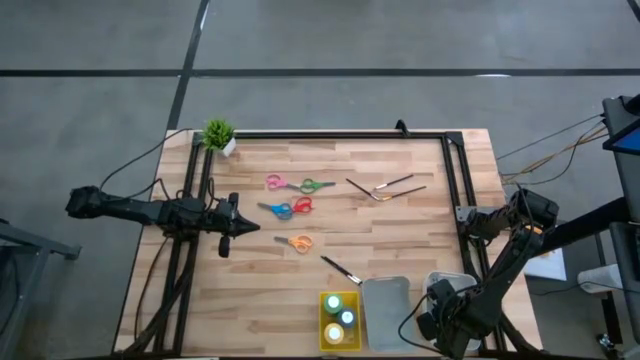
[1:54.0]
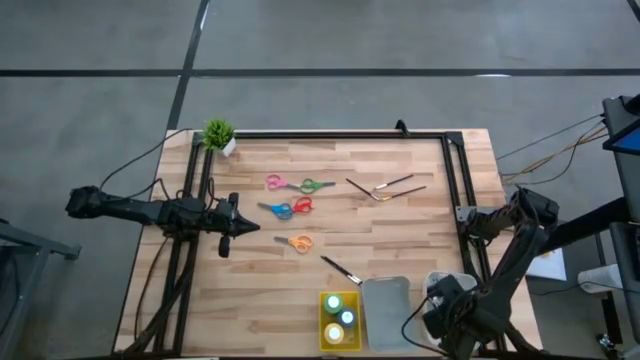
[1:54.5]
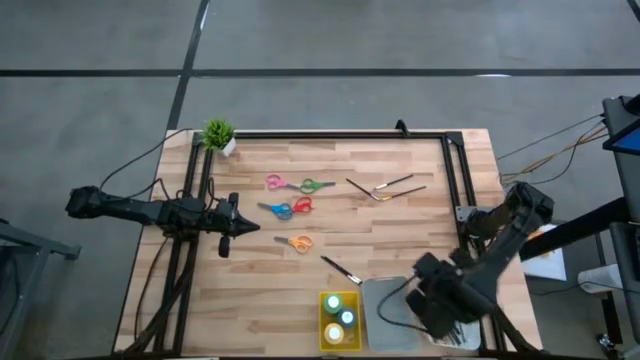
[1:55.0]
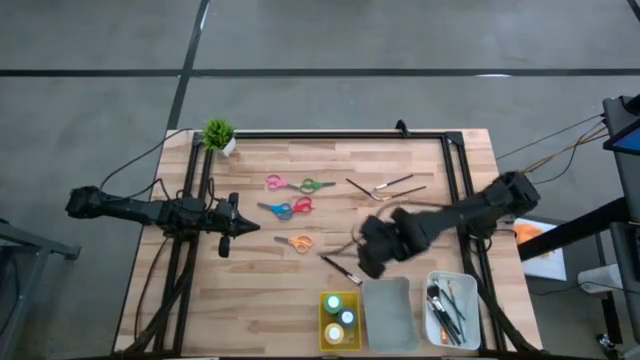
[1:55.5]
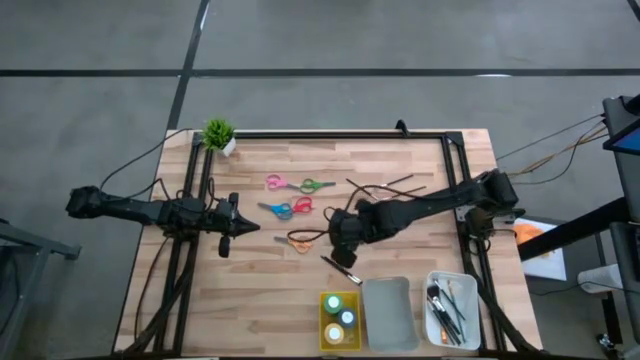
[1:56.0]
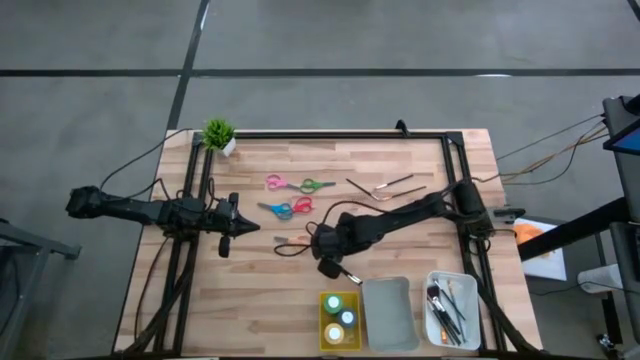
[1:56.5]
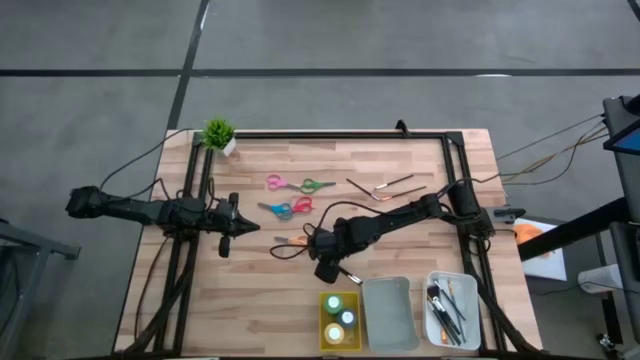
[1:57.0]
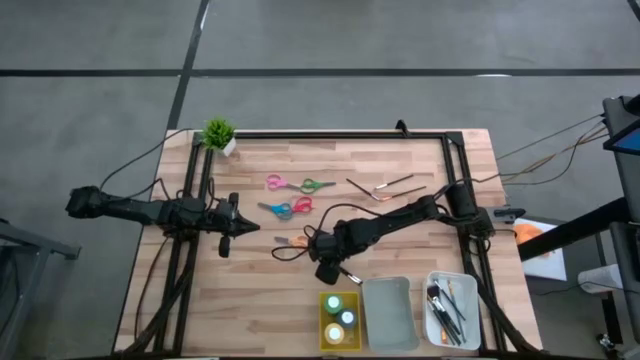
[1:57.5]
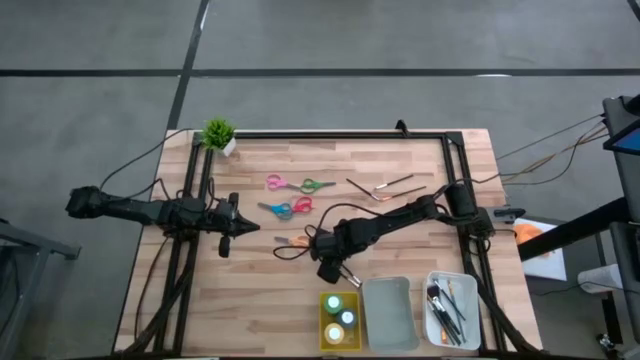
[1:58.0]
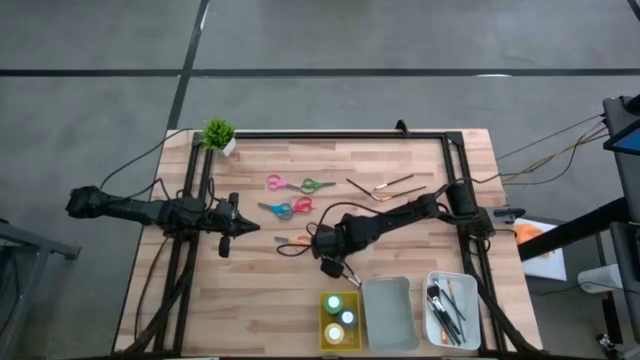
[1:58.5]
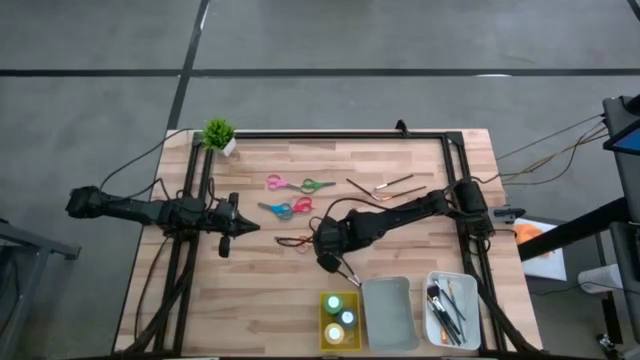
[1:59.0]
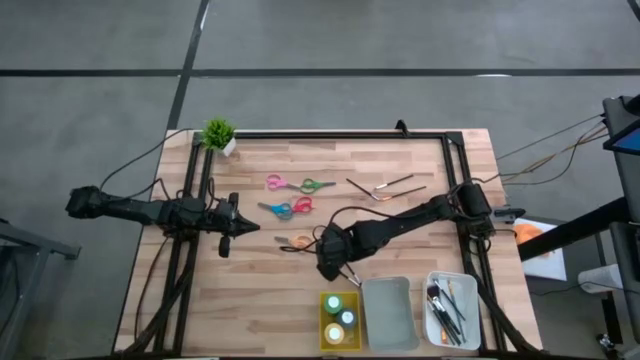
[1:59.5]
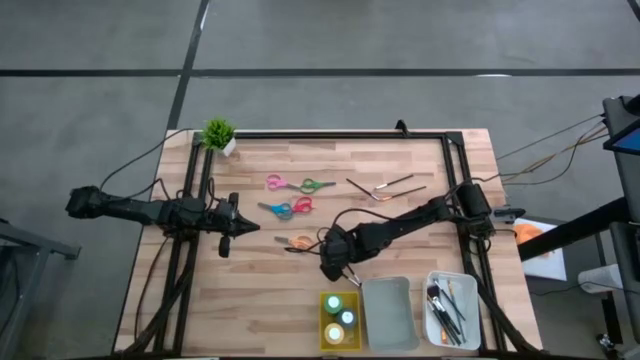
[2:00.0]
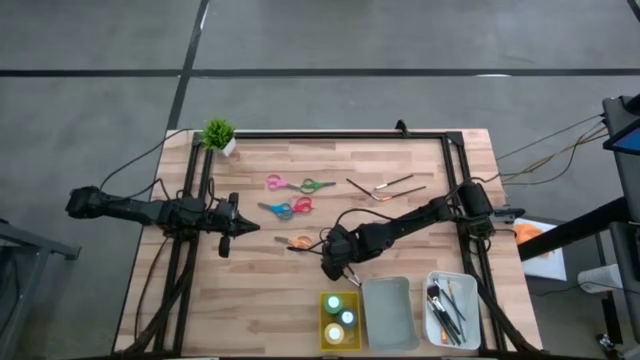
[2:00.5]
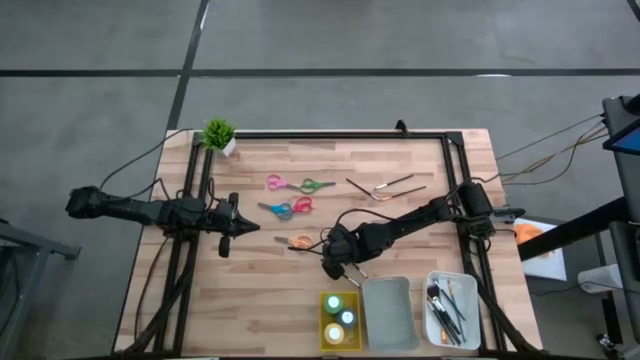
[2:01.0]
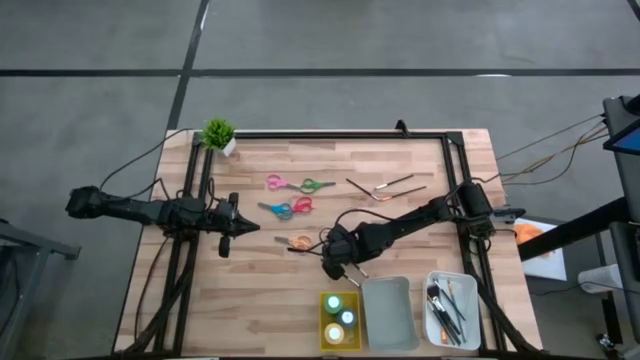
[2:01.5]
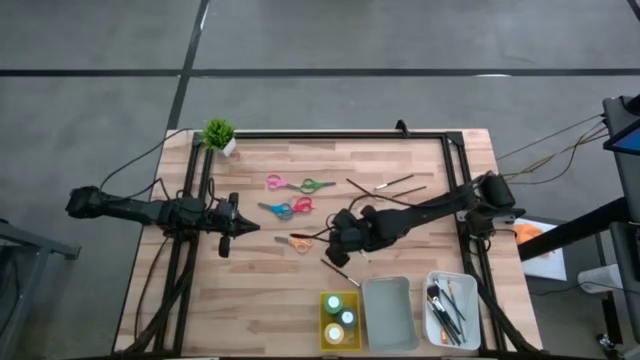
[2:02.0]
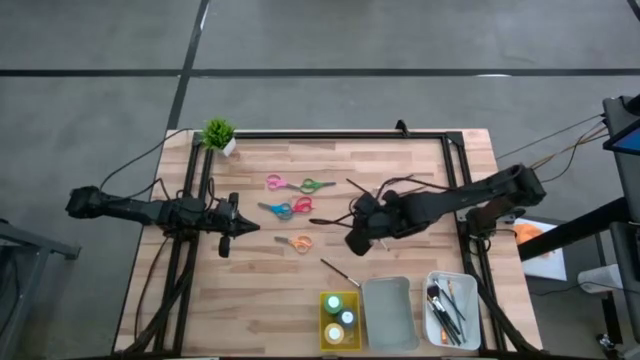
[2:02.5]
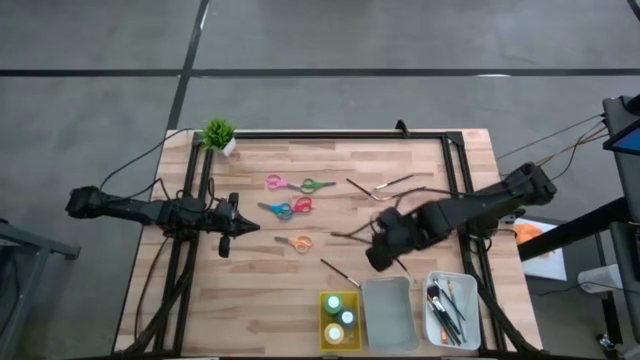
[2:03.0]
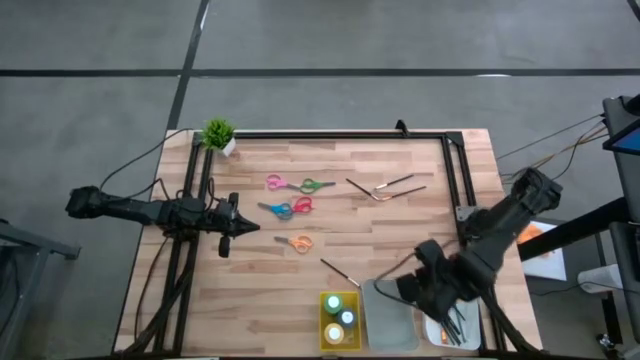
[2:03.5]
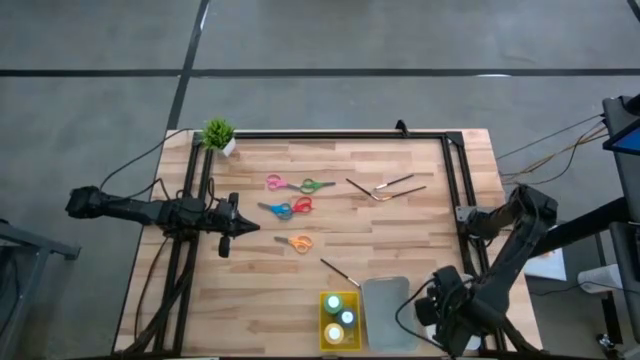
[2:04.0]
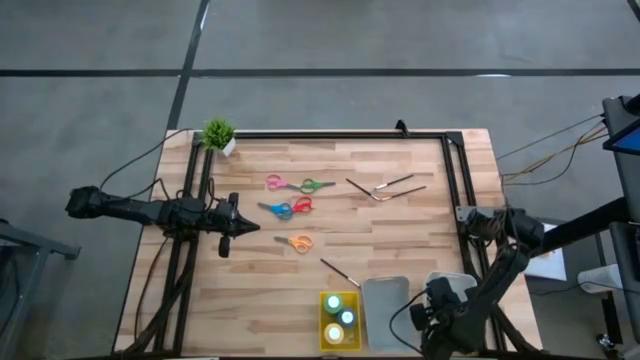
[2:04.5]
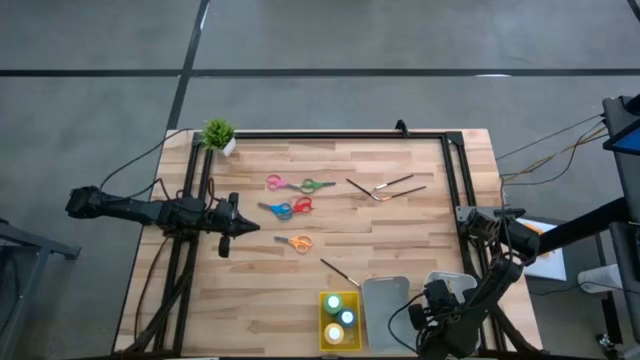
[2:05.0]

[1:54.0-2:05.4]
Task: Pick & Place Paint Supplies
Put the silver brush into the white bin

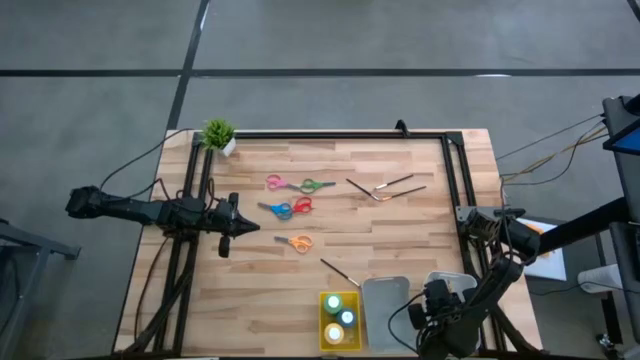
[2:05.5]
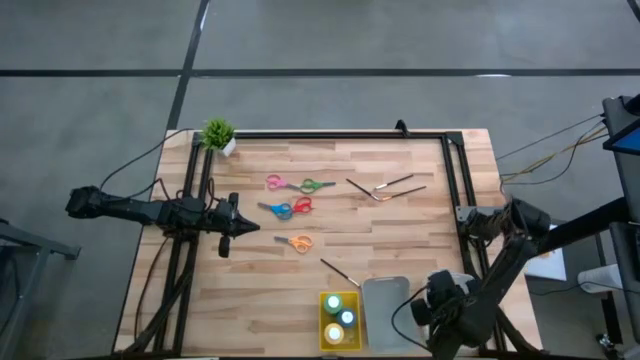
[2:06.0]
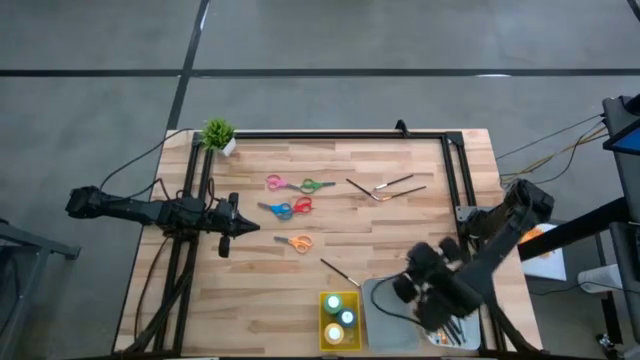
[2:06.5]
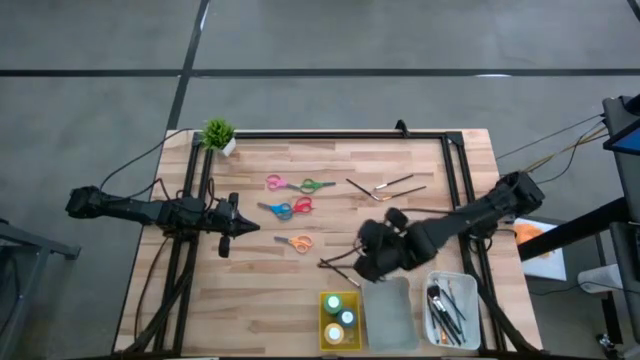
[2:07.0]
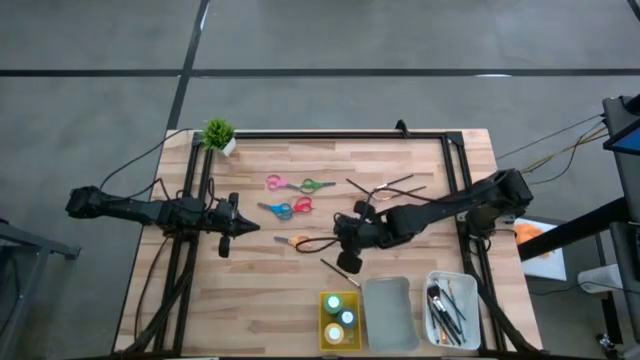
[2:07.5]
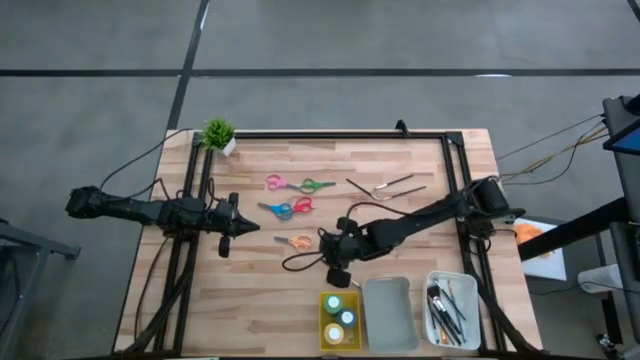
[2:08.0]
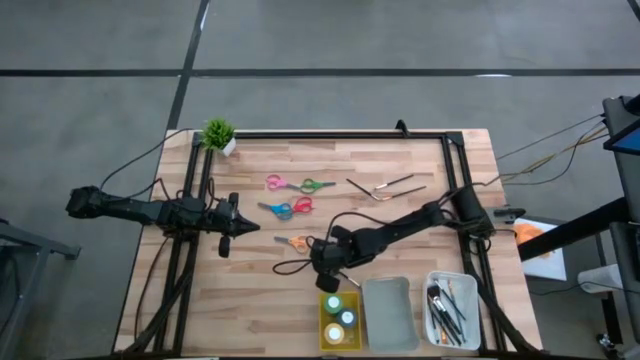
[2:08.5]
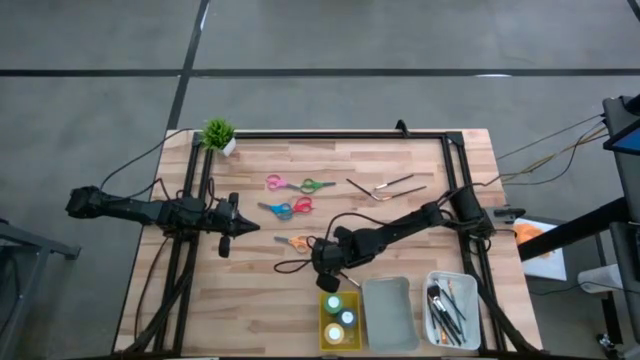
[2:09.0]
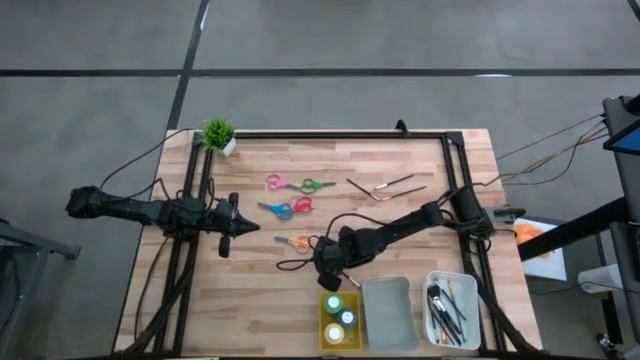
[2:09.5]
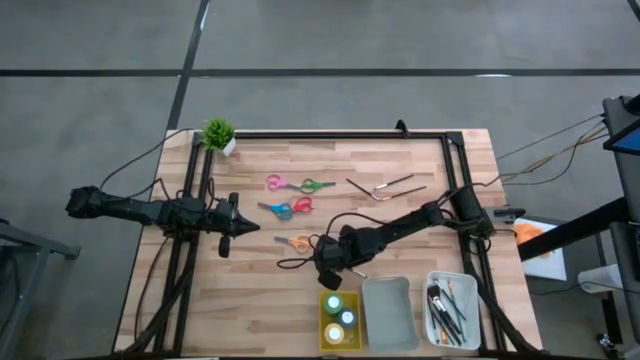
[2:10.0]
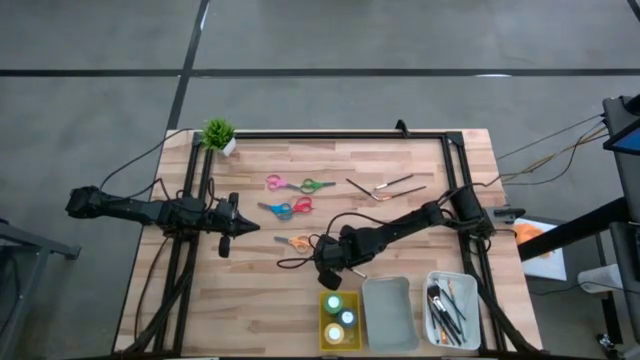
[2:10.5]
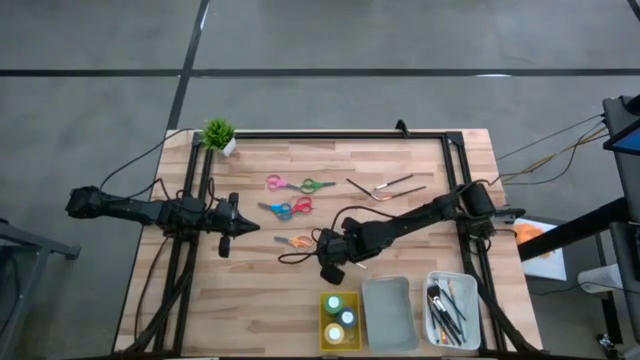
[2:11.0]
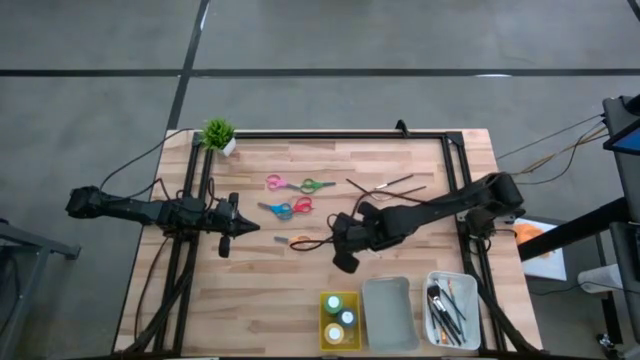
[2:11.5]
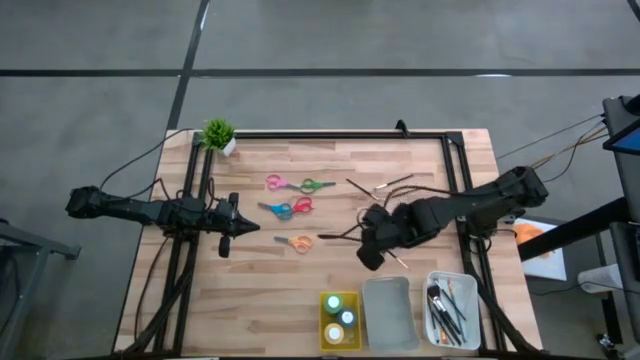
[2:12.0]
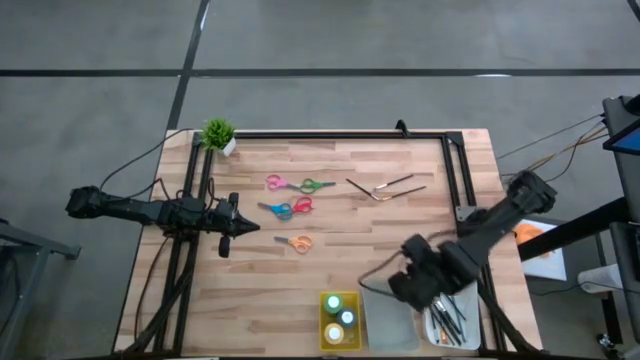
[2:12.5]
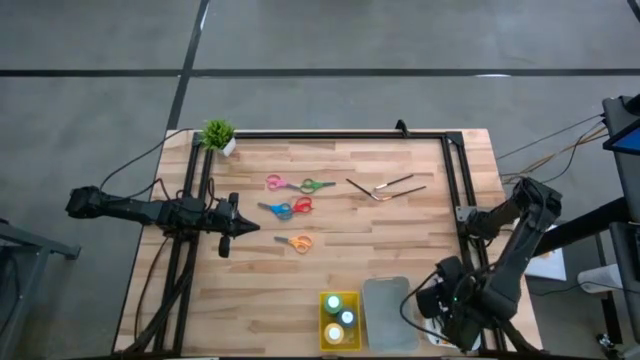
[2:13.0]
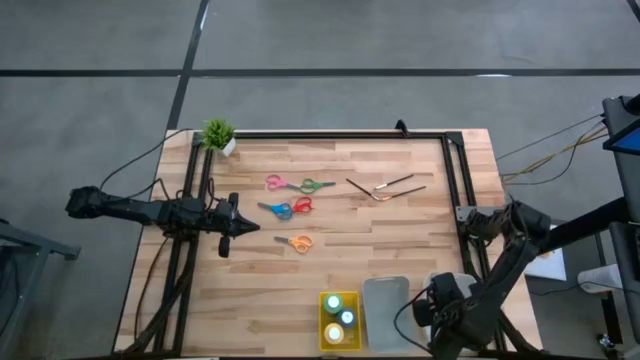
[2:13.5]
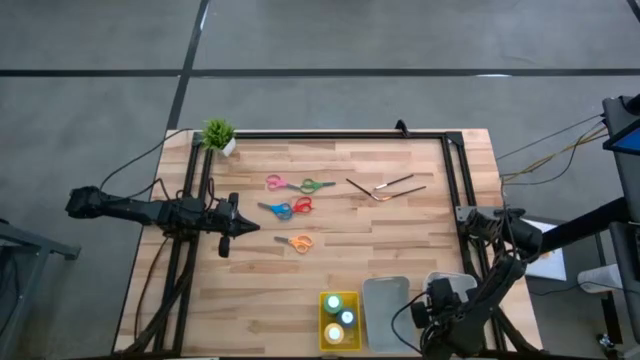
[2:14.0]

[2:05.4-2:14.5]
Put the silver brush into the white bin
